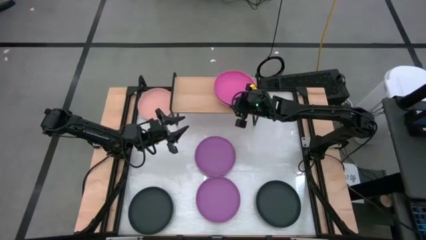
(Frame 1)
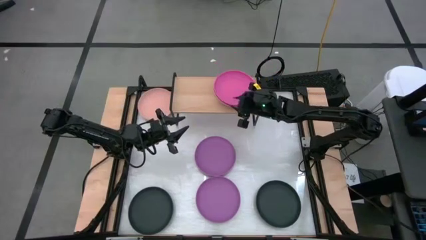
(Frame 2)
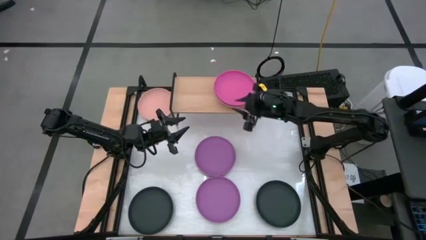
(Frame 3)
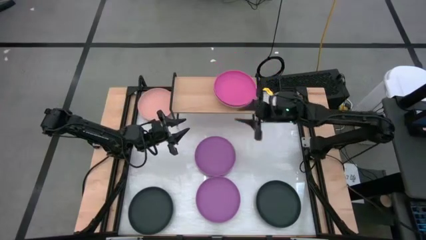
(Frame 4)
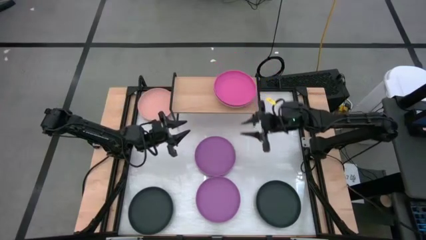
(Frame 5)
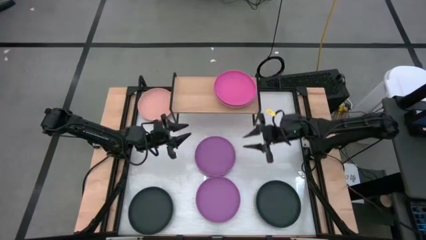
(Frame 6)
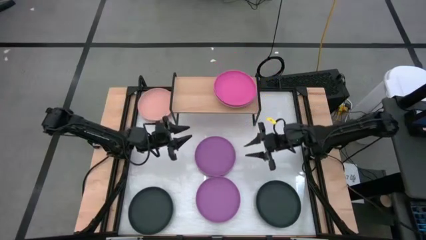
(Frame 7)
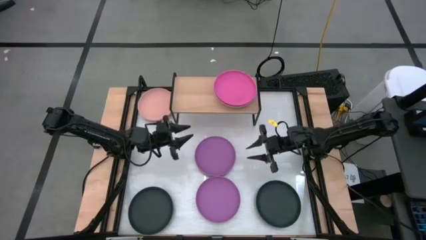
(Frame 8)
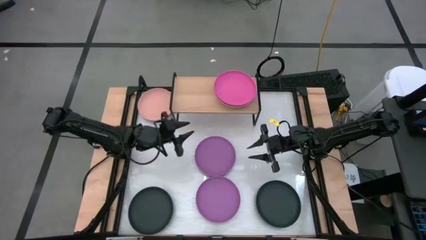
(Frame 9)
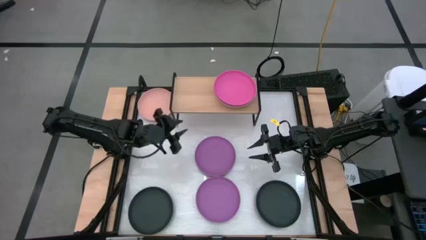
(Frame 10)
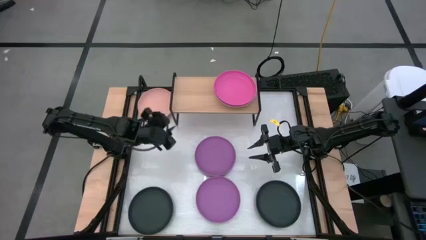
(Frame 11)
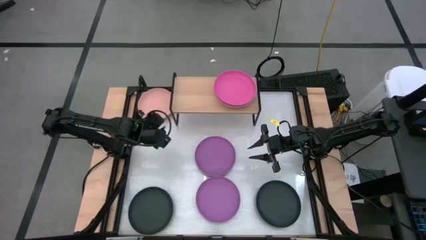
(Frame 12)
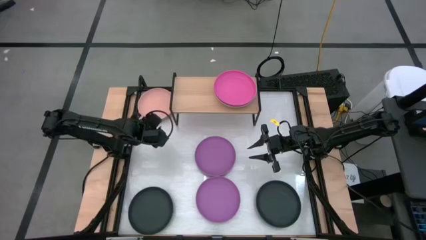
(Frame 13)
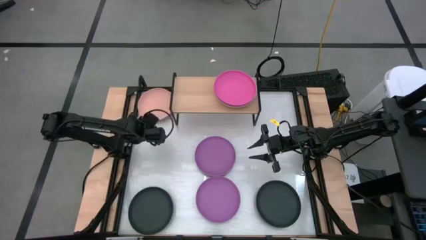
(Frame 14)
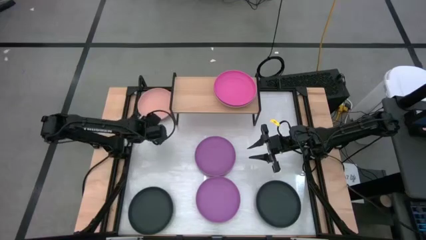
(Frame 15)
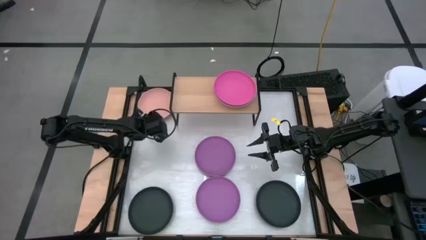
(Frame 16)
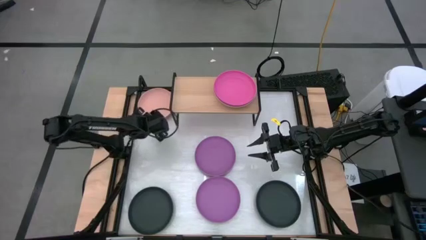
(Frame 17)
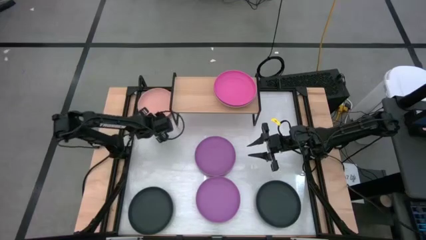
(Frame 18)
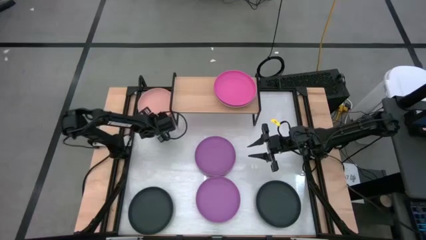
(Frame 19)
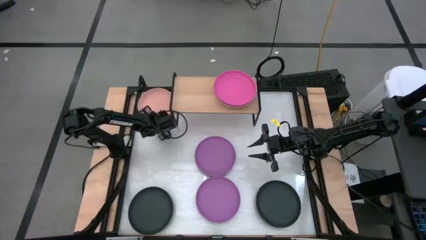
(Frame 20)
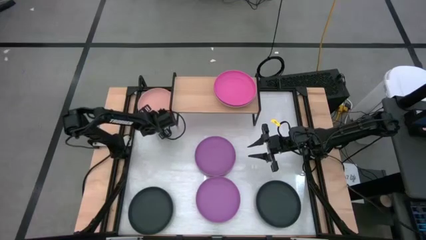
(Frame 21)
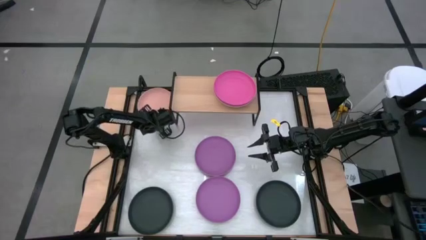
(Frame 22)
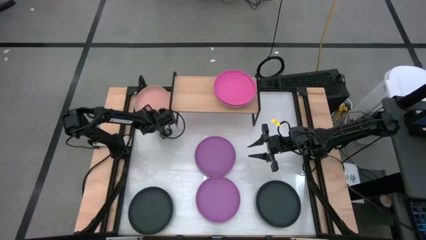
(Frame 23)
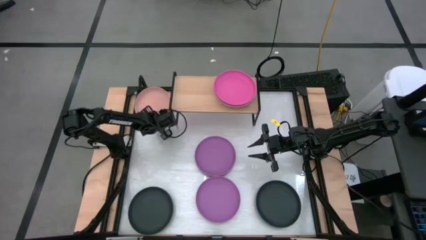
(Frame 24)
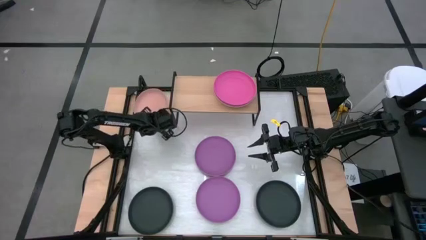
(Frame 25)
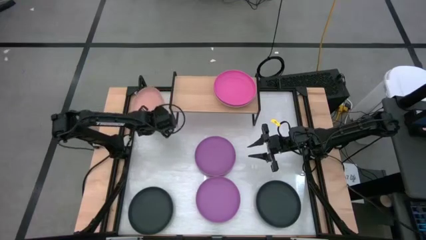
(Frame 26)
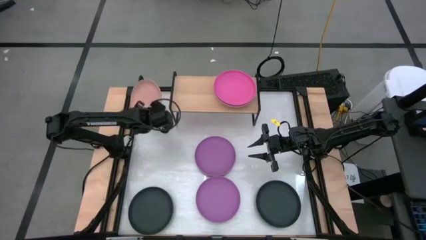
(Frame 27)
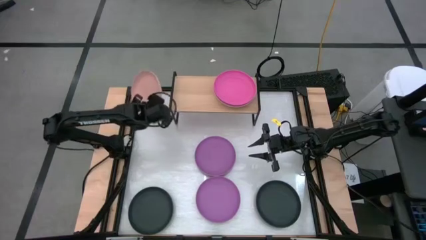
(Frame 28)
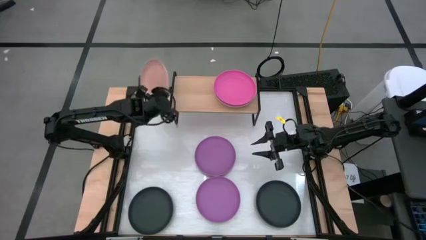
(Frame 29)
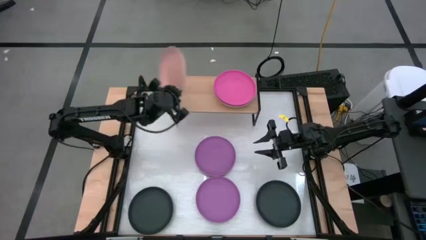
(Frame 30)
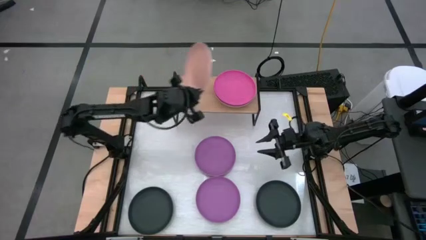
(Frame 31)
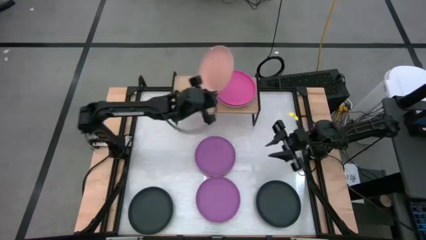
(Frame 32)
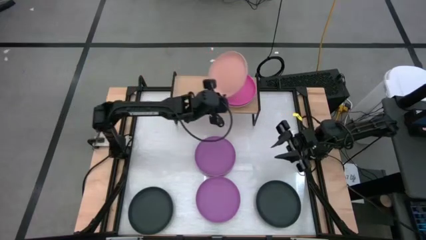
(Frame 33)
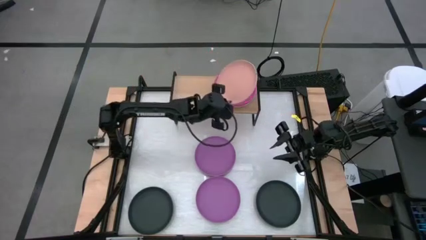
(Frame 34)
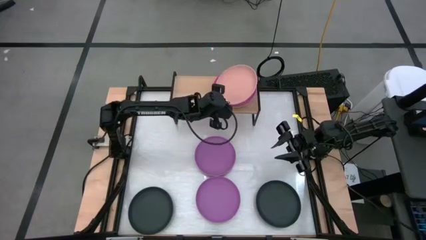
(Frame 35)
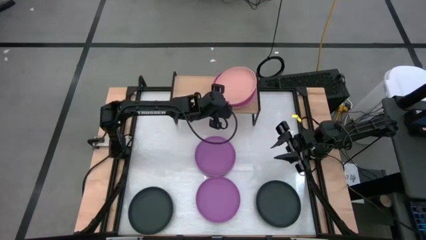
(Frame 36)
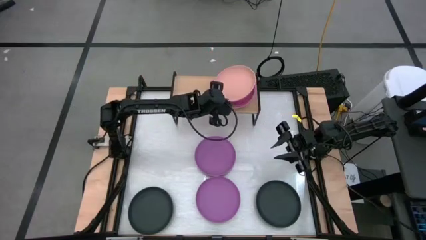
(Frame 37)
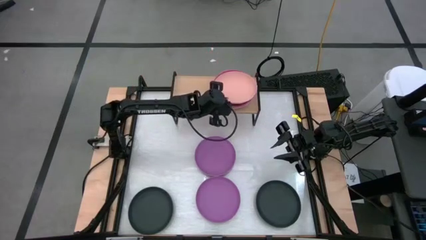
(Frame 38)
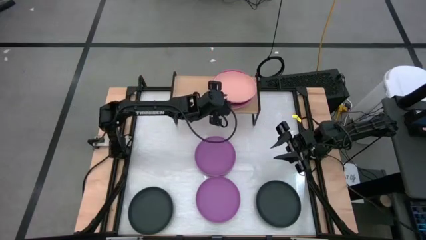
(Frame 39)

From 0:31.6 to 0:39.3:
Task: Place and stack plates onto a shelf
Stack the orange plate on top of the pink plate on the shelf

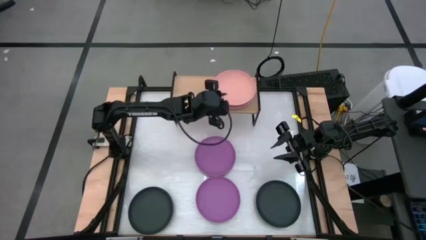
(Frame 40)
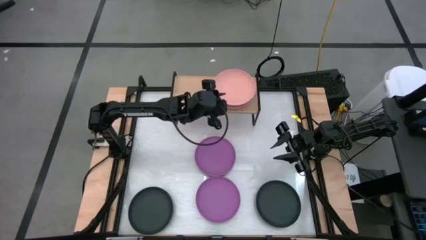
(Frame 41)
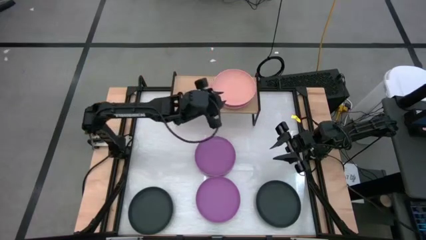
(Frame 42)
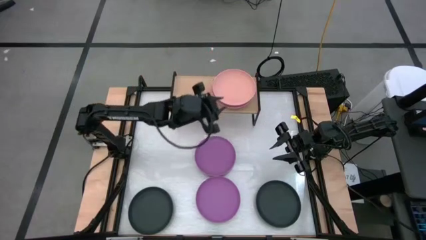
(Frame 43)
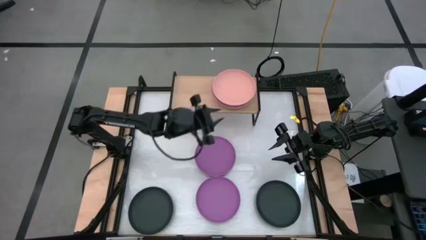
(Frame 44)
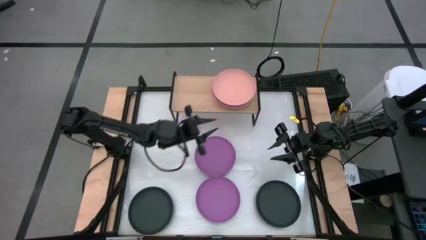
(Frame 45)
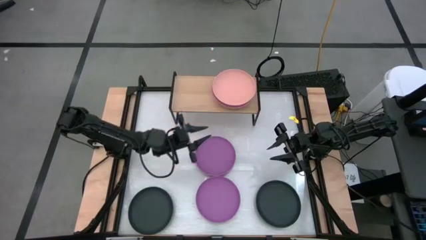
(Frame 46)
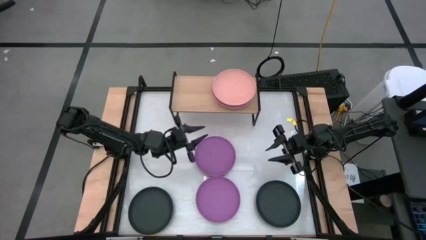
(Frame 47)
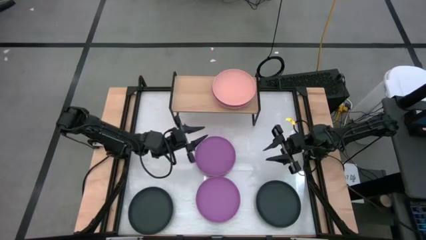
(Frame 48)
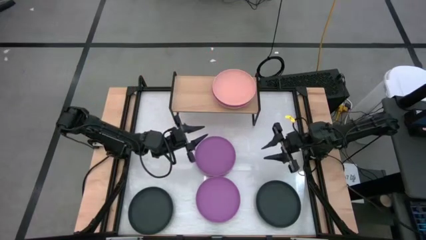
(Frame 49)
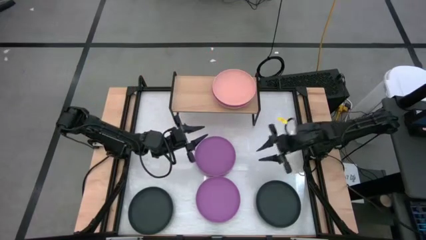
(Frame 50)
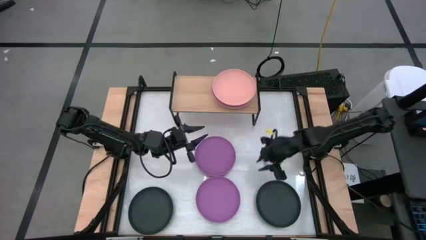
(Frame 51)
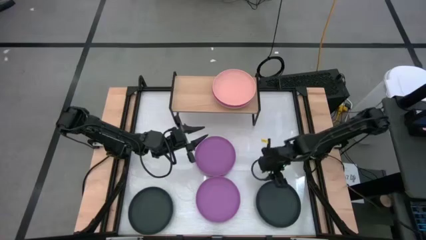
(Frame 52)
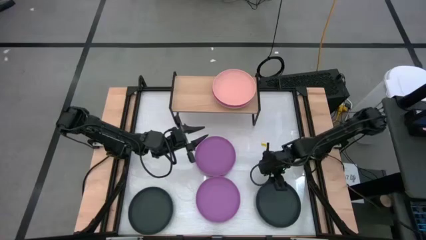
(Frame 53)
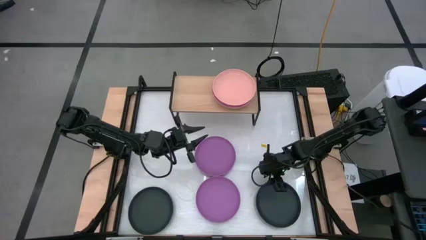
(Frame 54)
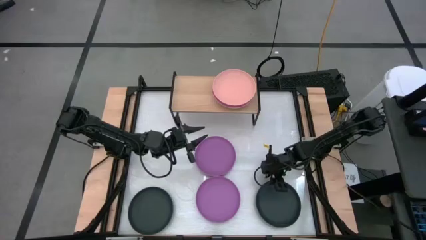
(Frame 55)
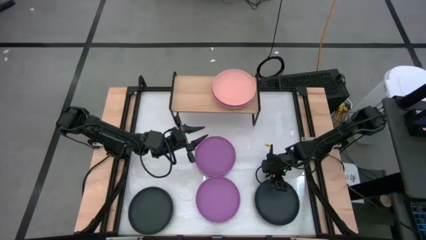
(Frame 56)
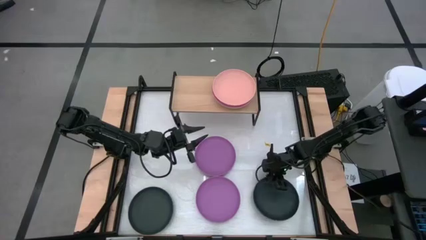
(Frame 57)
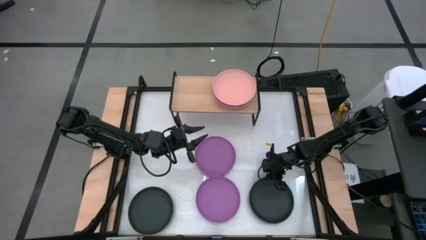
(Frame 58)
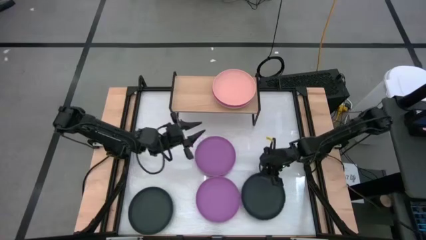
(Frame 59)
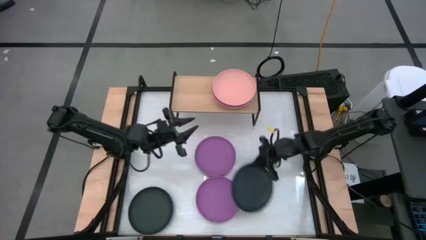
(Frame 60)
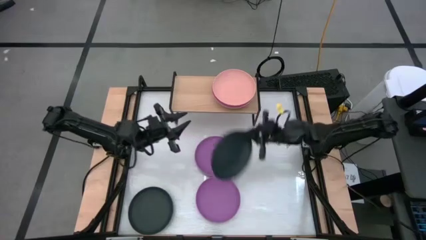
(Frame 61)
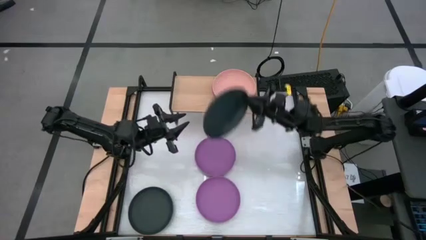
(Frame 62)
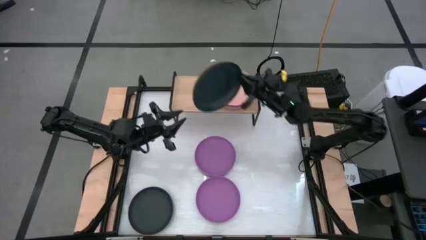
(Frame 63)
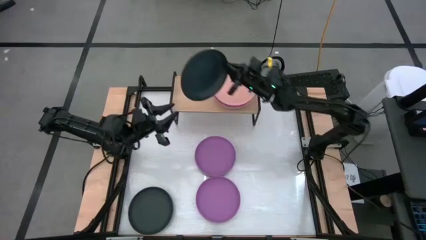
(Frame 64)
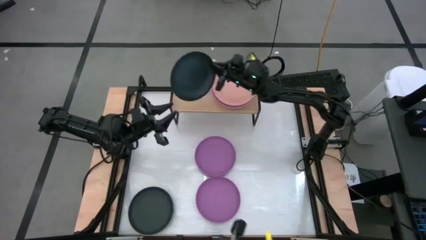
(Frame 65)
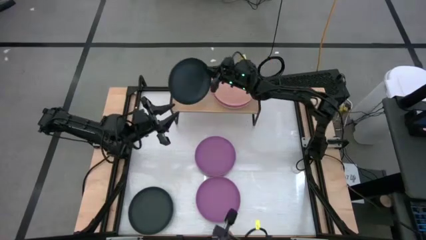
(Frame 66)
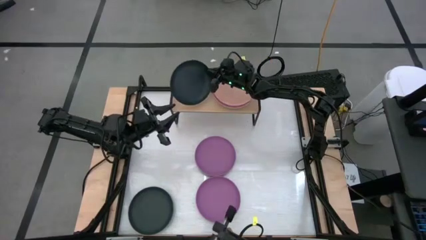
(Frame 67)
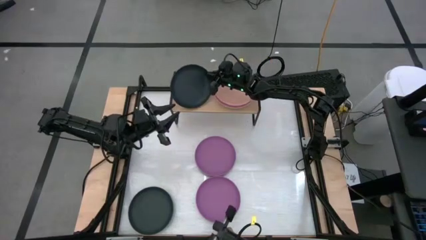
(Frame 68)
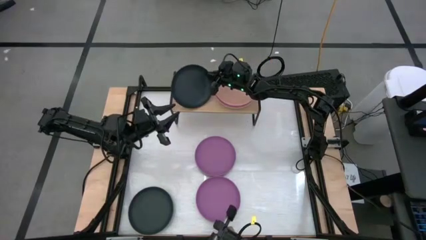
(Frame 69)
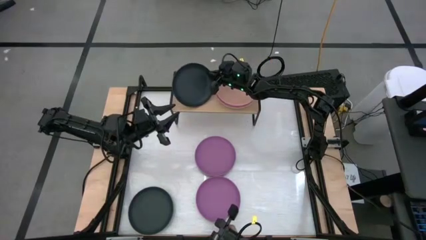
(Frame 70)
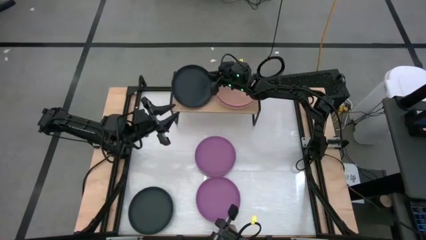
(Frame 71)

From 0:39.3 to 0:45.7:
Put the right black plate on the shelf

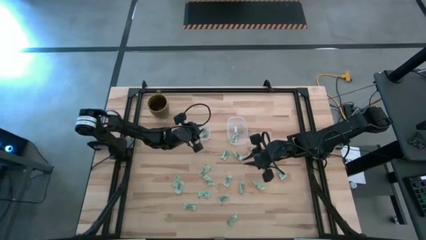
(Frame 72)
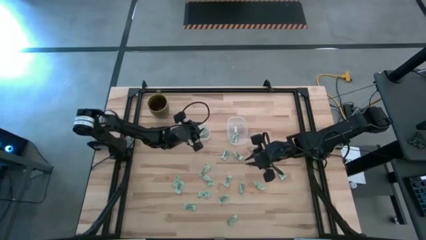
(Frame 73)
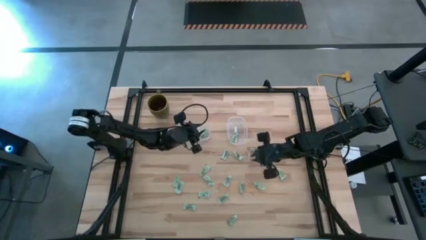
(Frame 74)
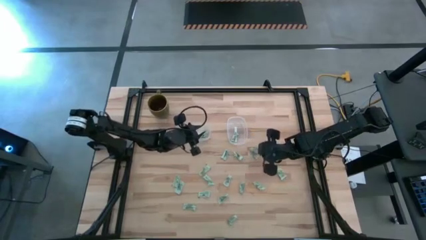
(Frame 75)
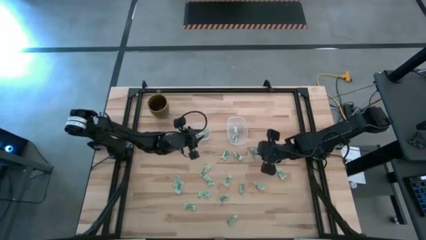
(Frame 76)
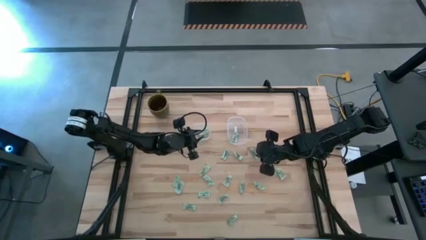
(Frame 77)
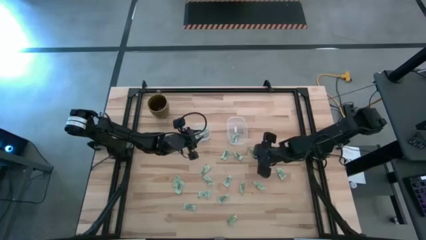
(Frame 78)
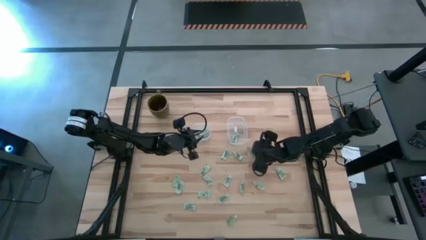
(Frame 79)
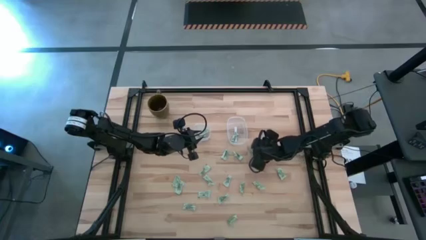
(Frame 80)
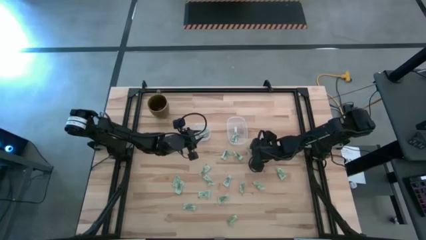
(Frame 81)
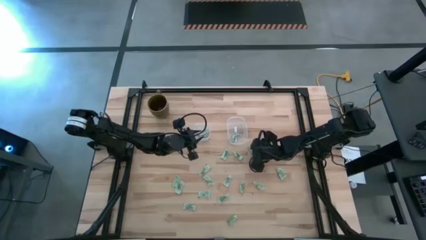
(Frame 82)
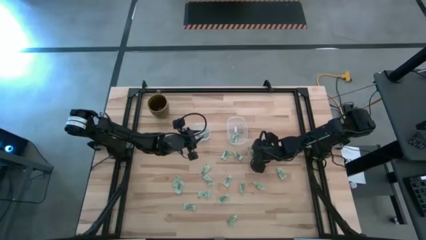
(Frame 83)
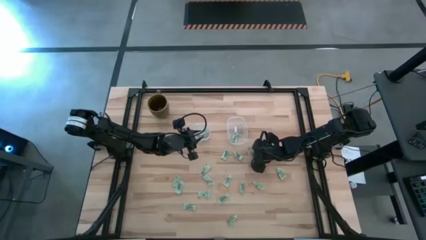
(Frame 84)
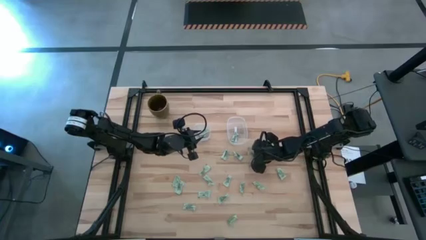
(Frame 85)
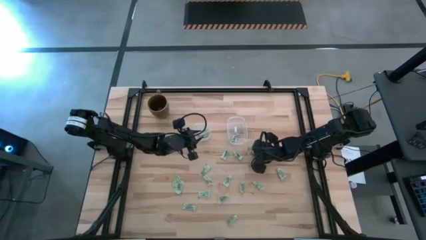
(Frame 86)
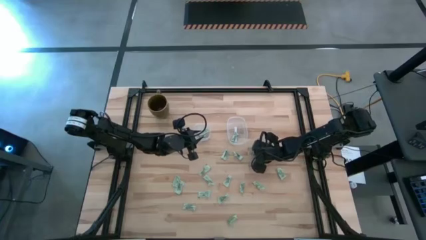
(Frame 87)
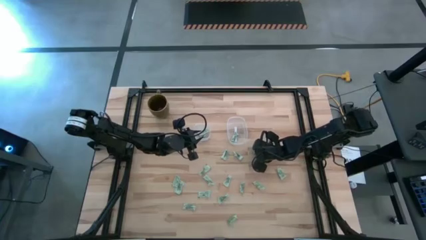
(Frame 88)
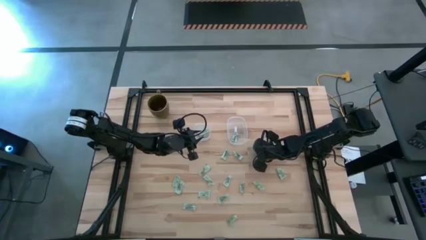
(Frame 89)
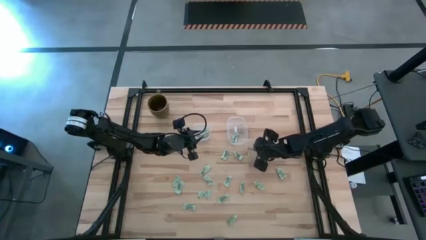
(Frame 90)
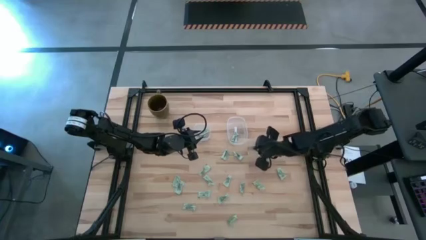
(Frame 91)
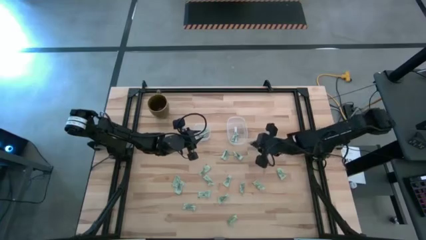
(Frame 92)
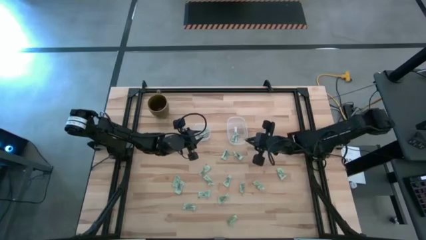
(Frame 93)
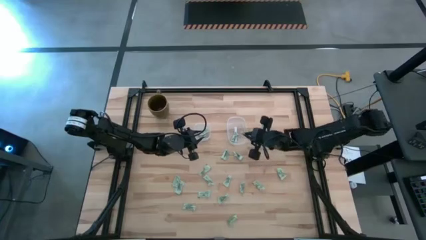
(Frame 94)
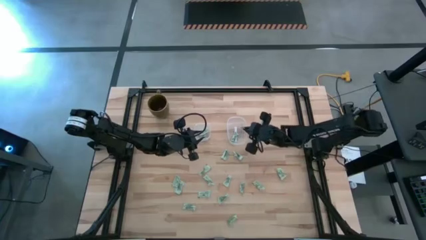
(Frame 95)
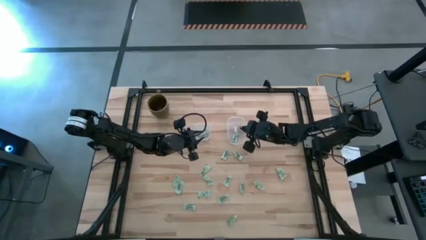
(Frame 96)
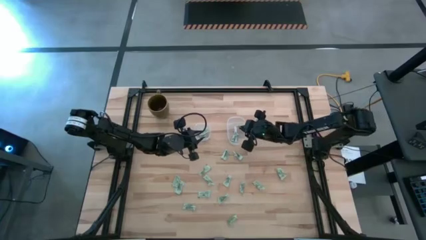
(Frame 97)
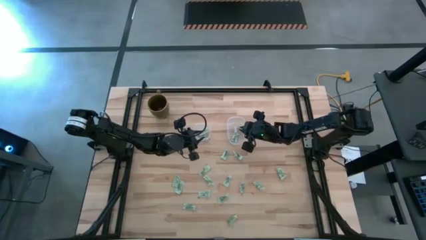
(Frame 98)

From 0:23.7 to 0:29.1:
Task: Pick and place items into bin
Put the light green stevia packet into the right transparent bin
